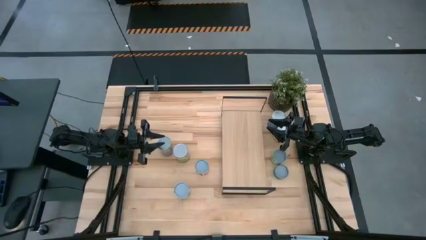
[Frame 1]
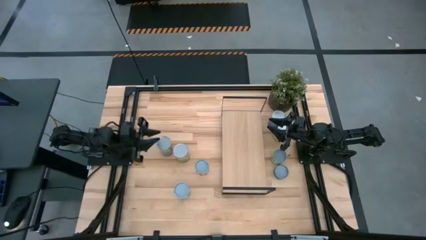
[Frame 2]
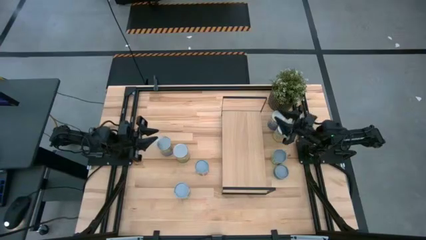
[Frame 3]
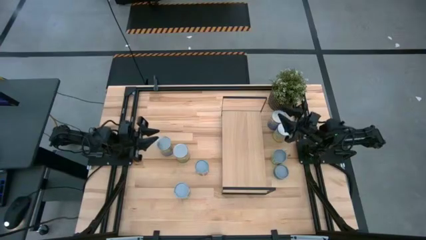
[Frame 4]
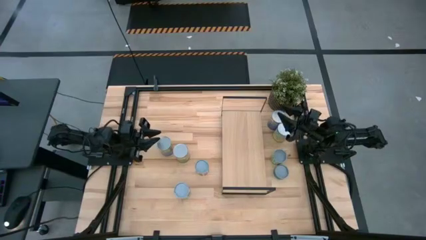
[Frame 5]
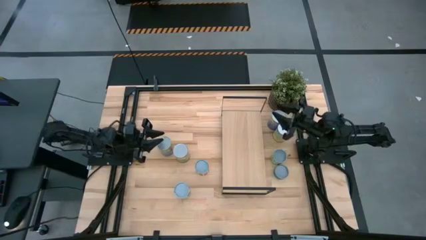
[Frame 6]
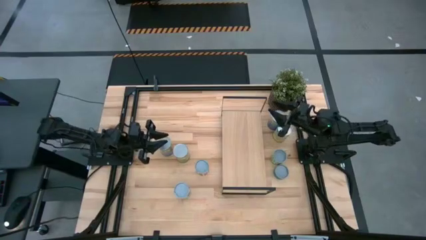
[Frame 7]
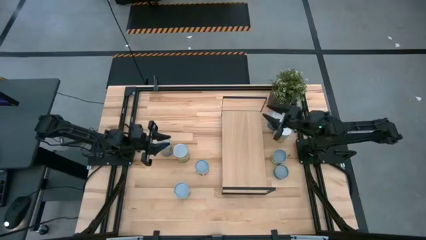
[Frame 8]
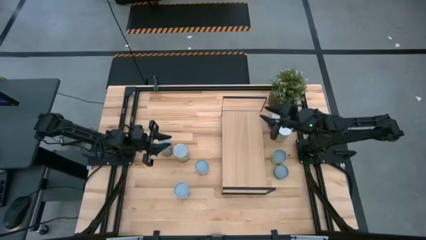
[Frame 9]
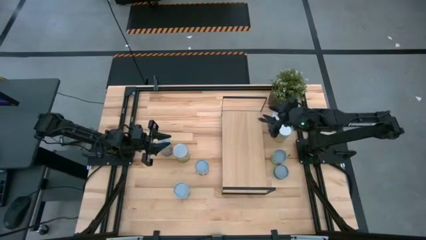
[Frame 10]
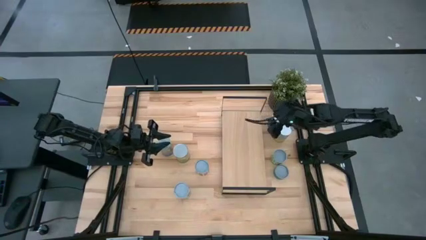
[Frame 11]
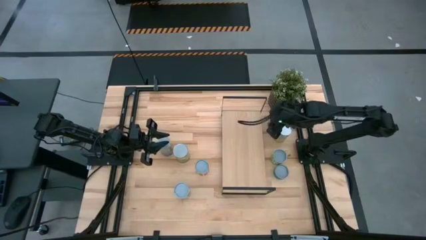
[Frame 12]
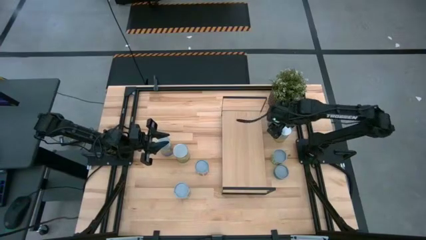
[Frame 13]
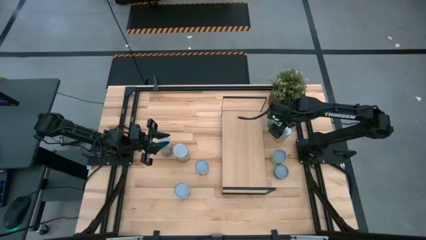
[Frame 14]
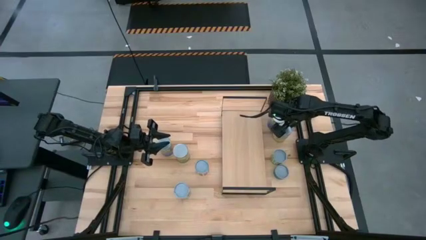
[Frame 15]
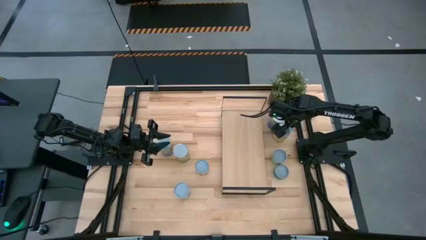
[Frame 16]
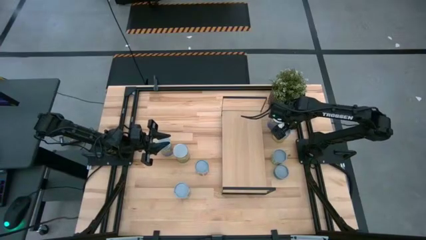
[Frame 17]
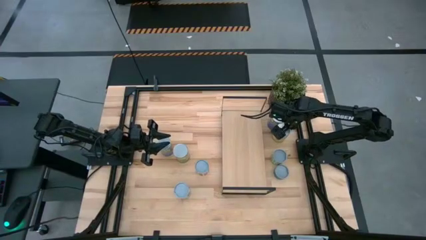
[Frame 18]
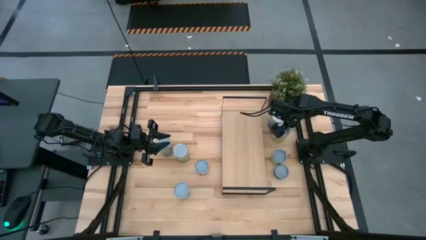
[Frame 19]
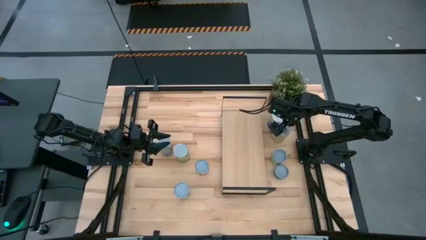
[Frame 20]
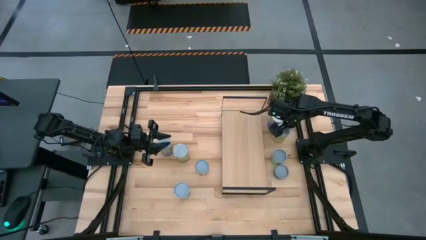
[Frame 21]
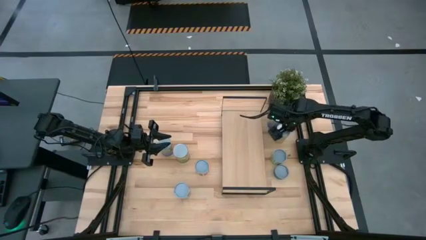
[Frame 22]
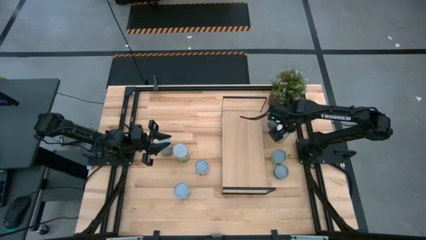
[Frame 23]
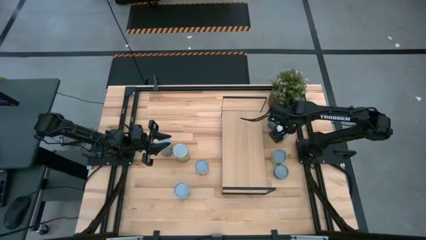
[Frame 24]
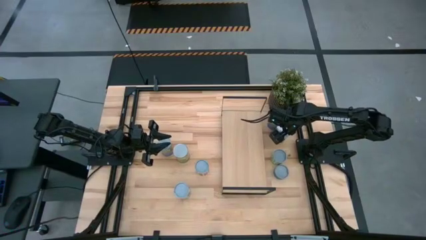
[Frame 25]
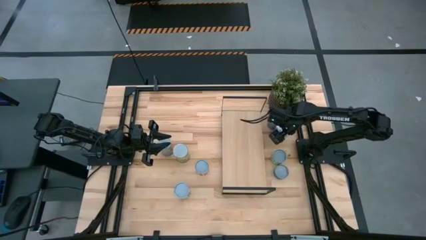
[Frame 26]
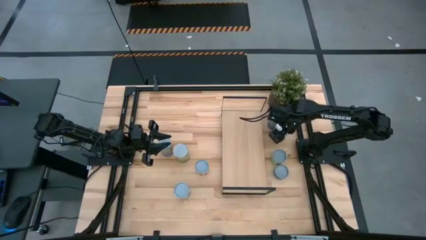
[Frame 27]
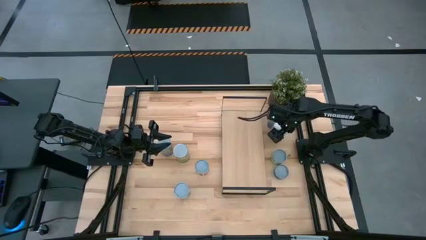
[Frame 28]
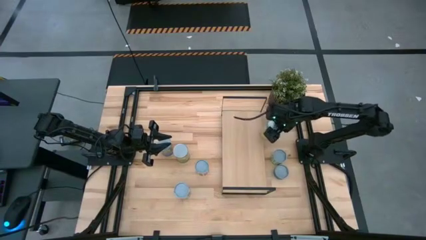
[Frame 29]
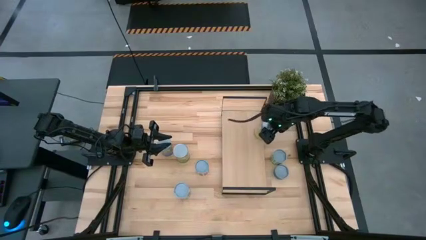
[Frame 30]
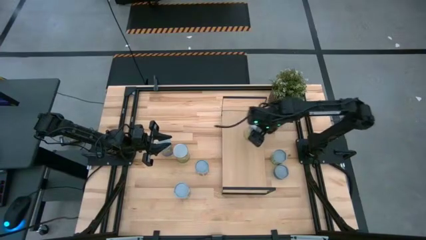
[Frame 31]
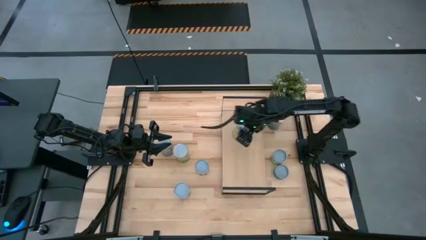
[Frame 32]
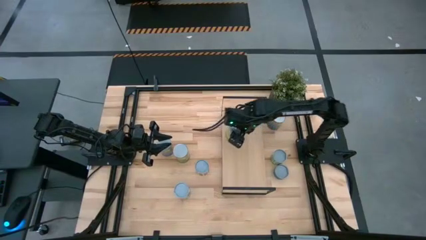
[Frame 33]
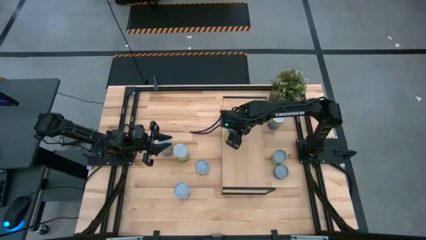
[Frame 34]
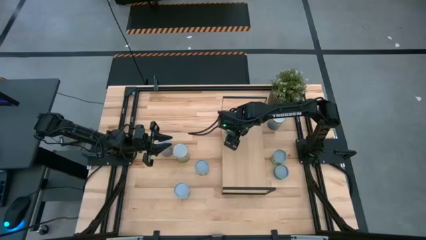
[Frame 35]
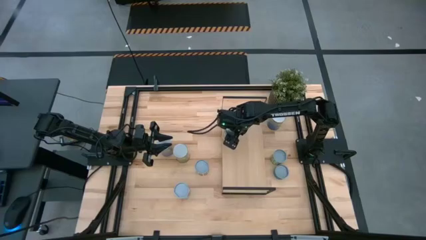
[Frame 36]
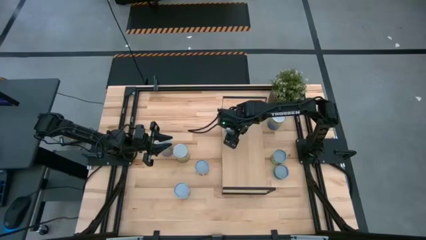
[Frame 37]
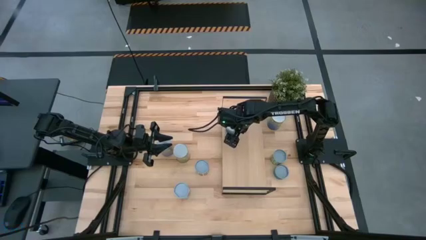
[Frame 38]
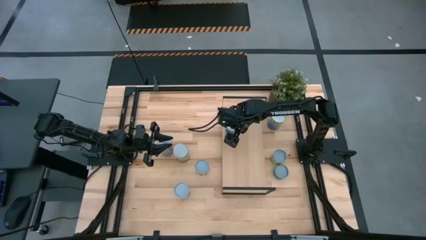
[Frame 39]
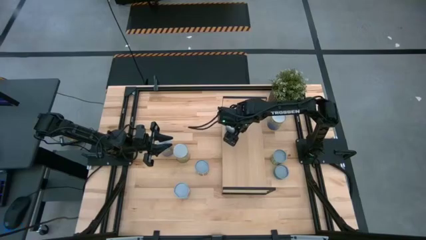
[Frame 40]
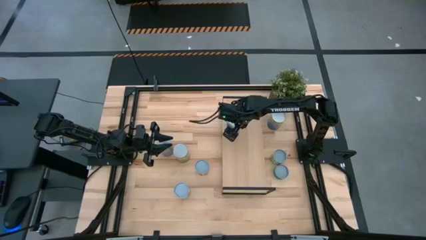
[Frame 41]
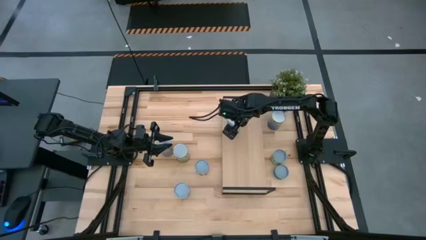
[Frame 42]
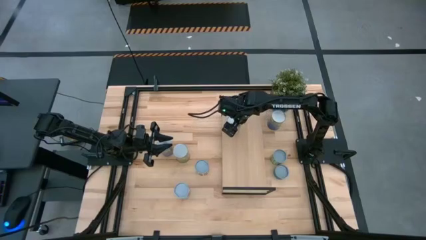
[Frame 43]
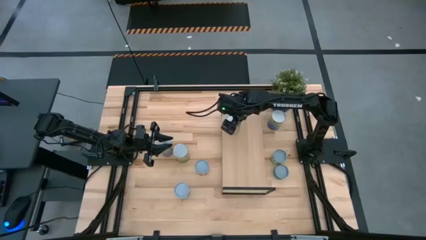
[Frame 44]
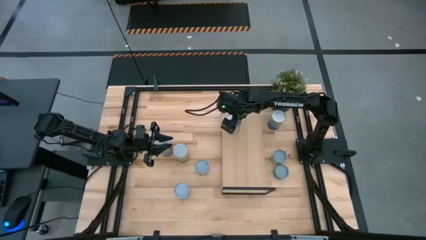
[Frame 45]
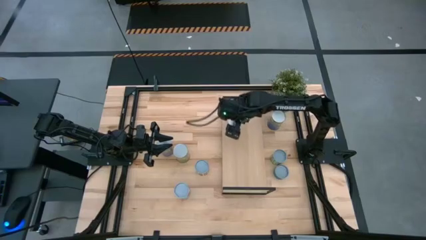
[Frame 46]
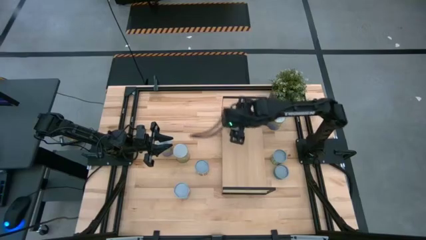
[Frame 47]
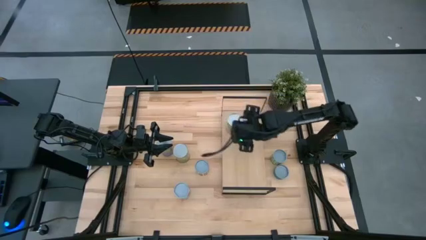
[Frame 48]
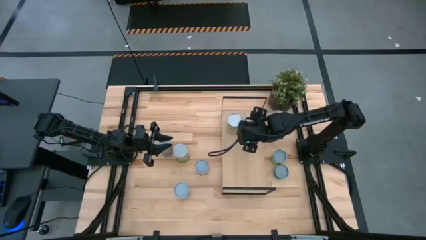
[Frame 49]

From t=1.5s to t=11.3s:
Task: Pick and place cans onto a shelf
Put the canned carrots on the shelf

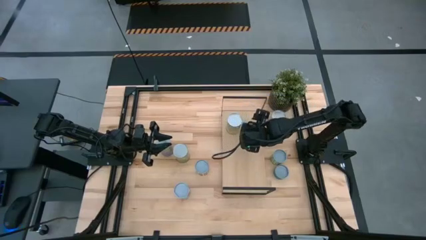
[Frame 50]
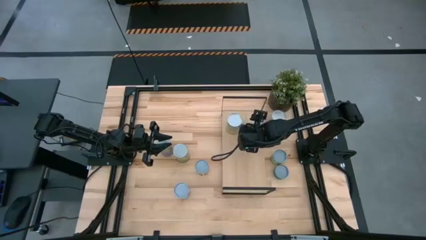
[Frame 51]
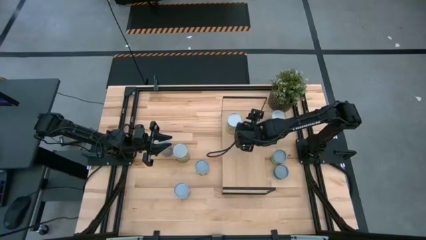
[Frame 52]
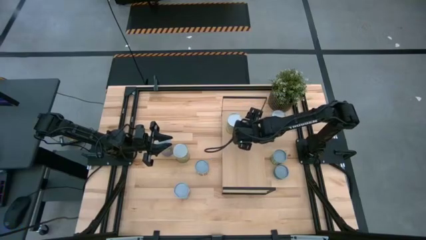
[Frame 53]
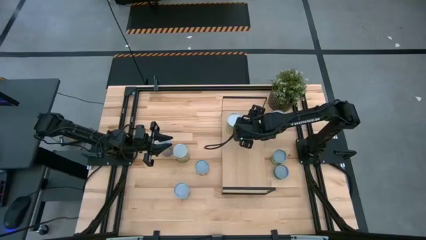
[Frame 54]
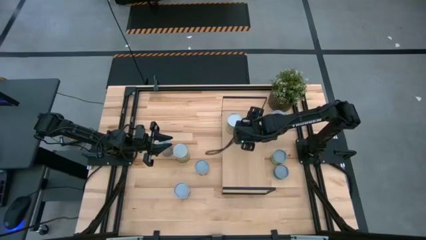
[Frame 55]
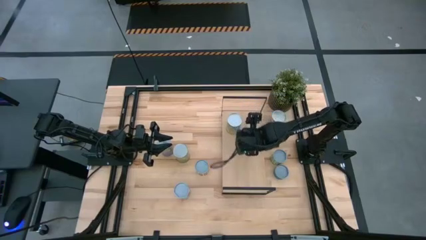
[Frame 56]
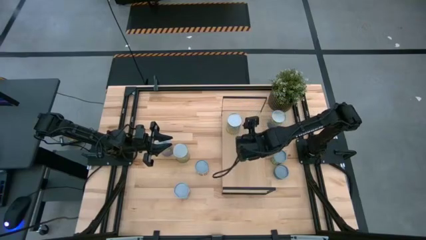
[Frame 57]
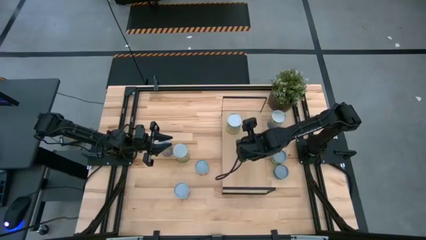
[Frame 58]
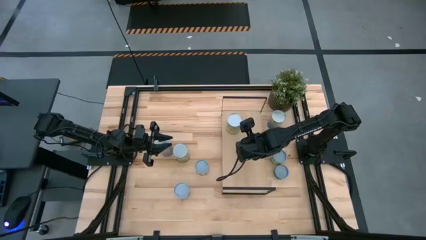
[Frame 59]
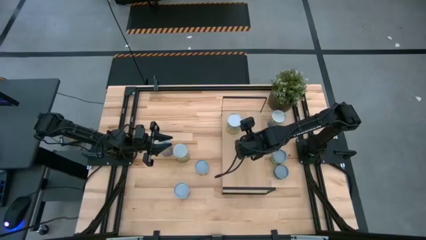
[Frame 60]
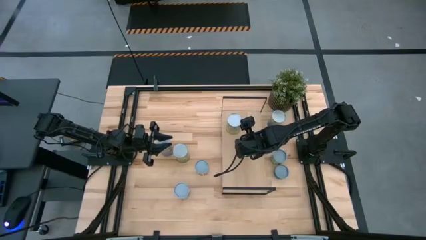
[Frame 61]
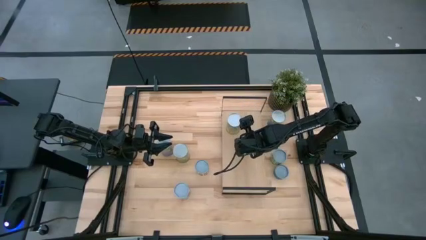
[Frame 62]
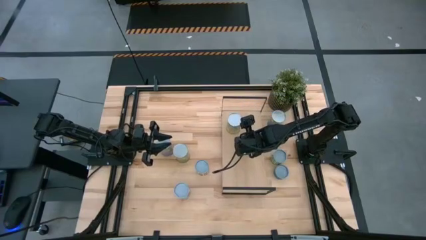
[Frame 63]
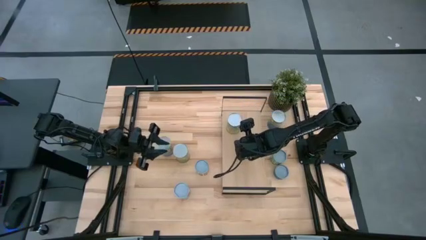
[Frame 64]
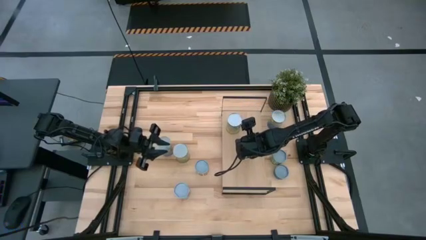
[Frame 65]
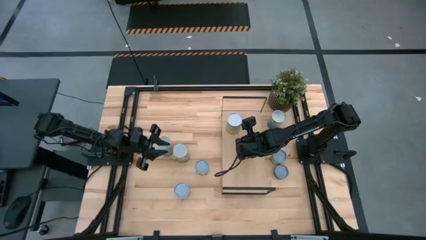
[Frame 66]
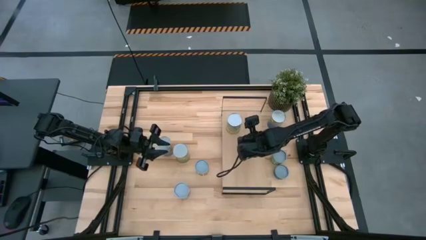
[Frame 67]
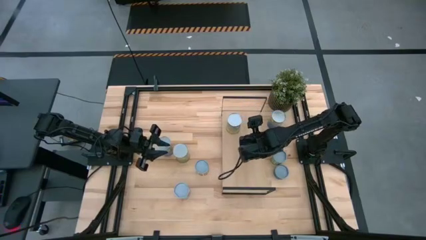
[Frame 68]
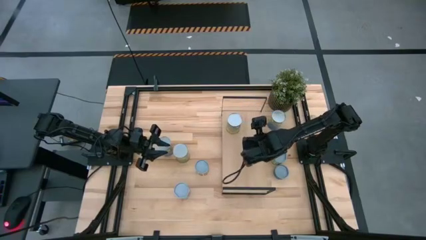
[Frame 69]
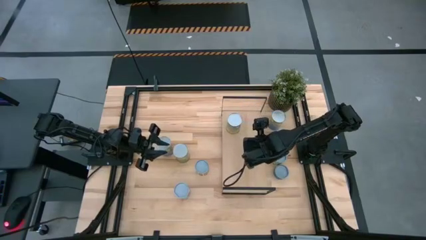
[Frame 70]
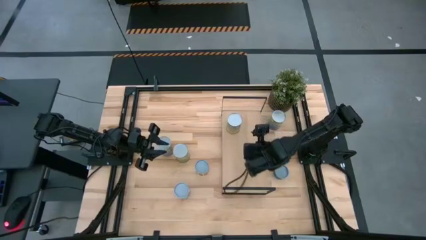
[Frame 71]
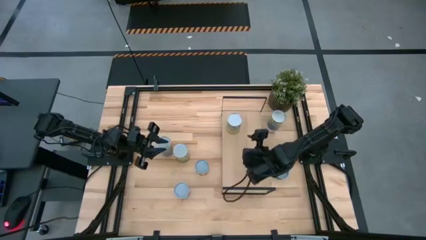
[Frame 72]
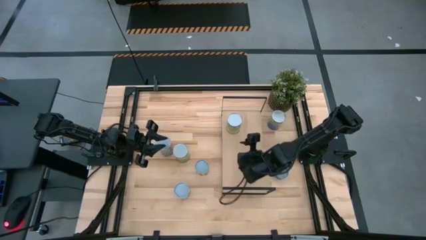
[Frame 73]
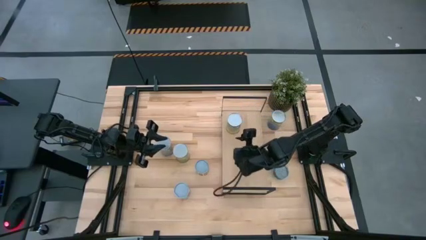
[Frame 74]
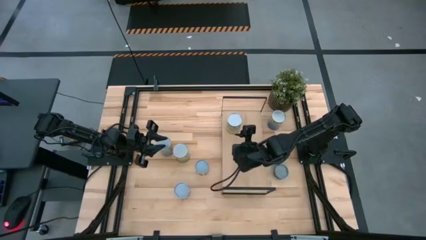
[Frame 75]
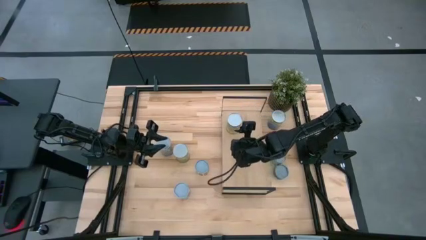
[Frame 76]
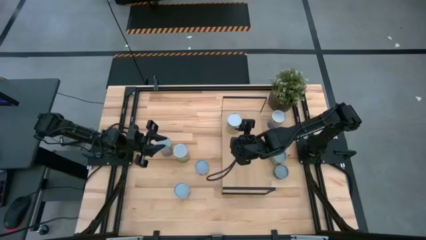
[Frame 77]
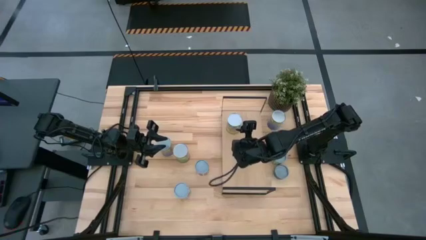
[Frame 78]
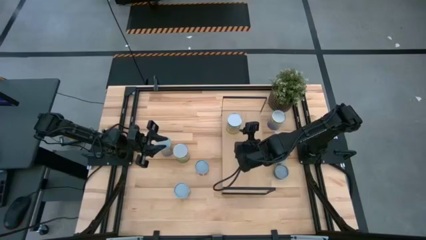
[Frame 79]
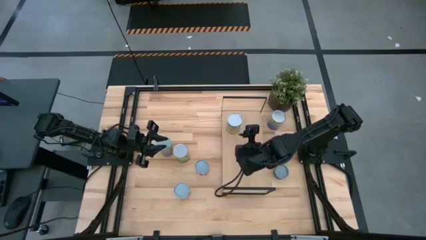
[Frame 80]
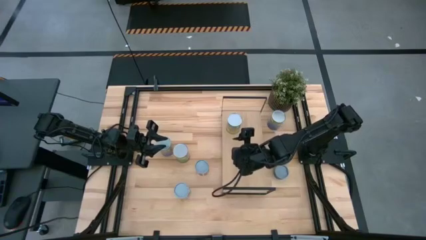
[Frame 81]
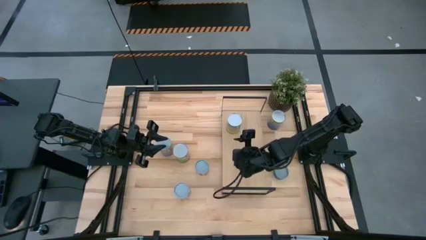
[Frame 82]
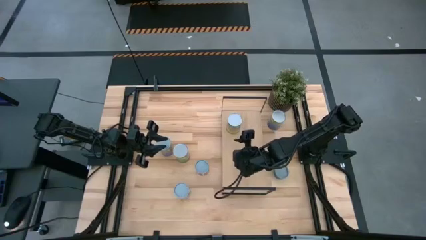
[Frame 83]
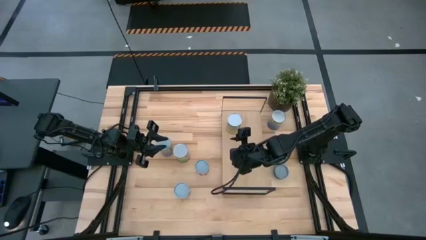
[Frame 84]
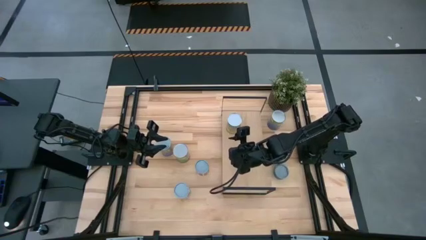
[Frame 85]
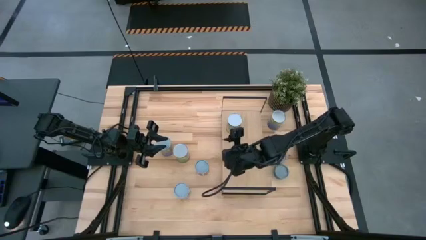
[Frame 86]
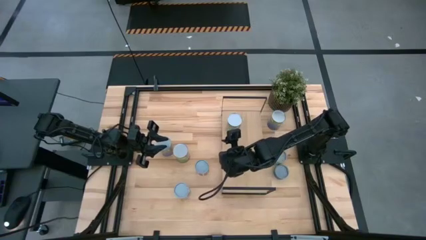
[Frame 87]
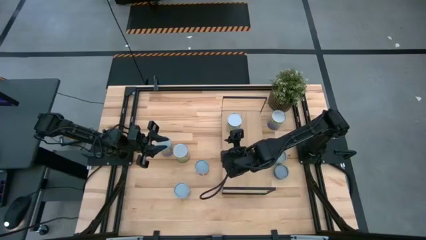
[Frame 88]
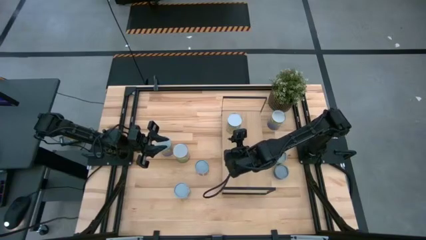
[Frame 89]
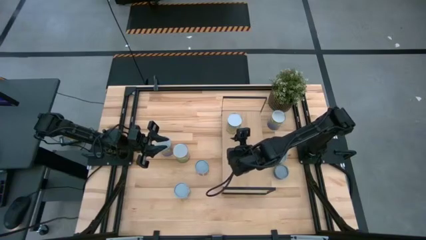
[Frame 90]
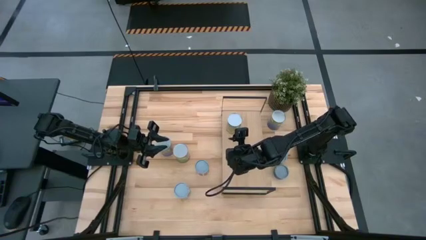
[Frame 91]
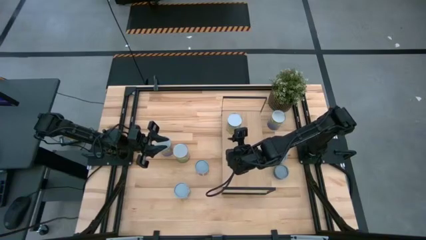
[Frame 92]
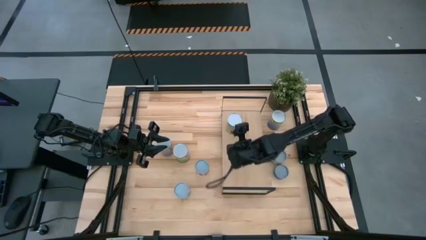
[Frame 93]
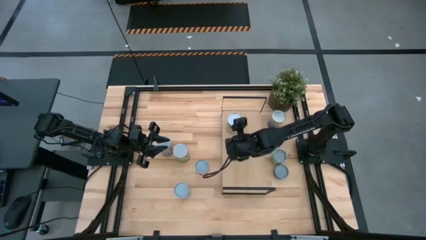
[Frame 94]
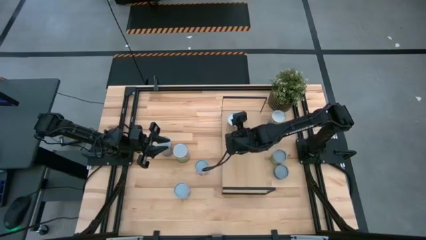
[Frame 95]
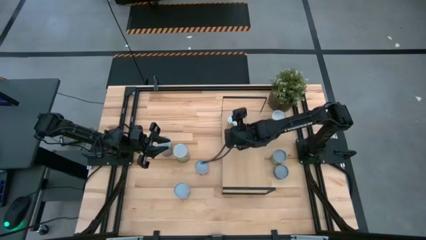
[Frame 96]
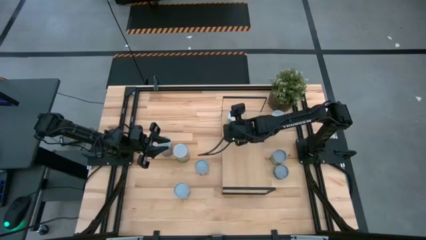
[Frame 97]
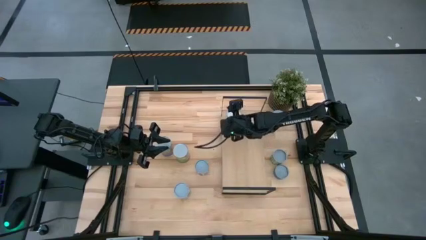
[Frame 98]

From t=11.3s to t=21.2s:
Put the canned carrots on the shelf
